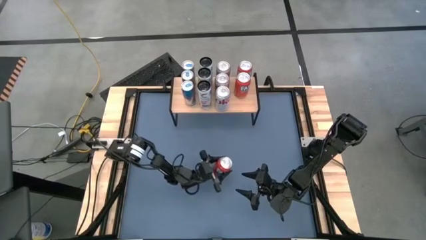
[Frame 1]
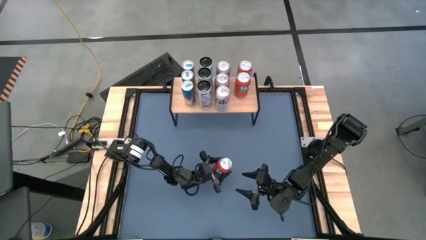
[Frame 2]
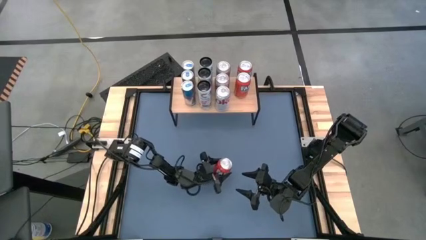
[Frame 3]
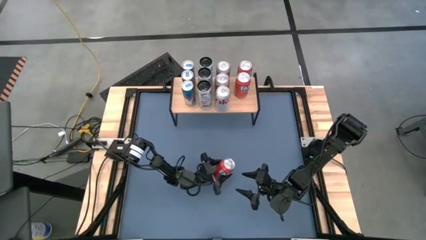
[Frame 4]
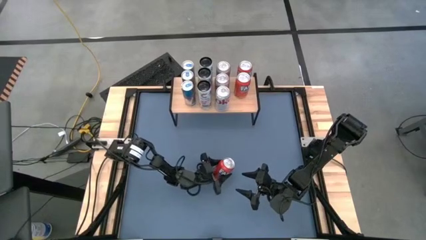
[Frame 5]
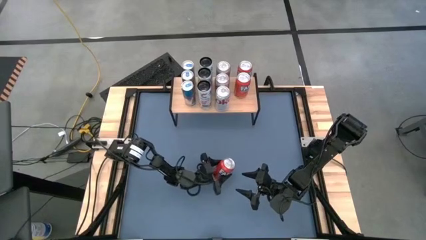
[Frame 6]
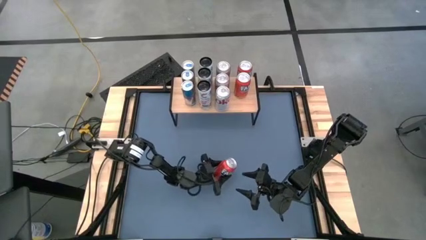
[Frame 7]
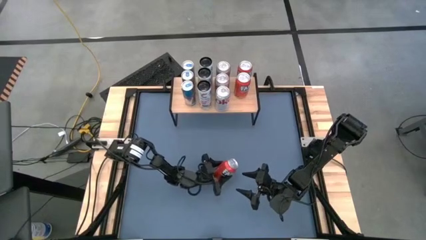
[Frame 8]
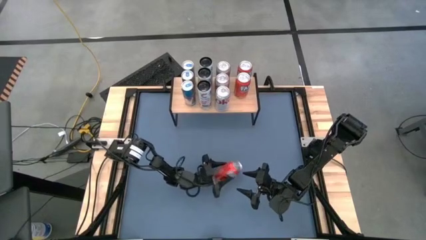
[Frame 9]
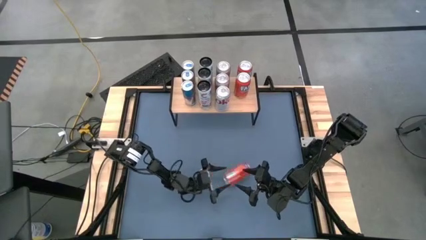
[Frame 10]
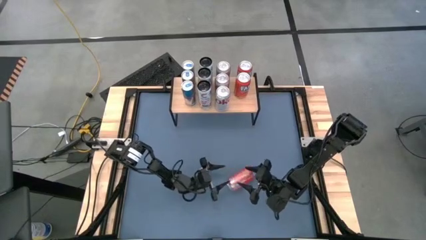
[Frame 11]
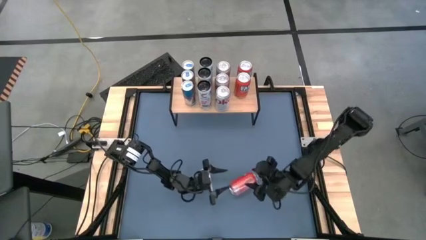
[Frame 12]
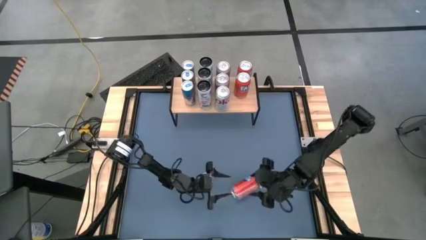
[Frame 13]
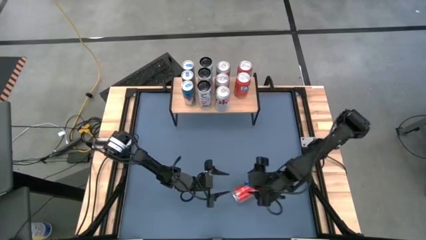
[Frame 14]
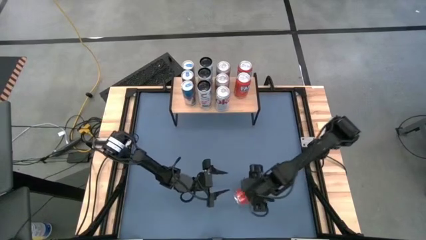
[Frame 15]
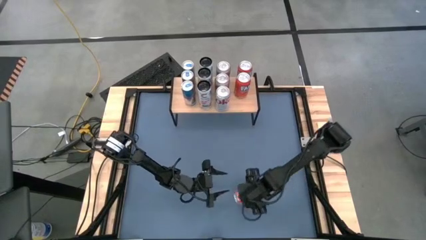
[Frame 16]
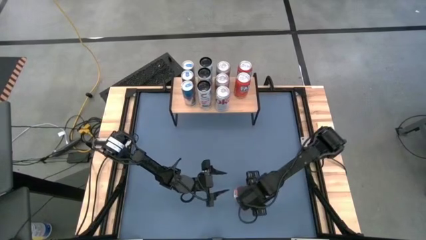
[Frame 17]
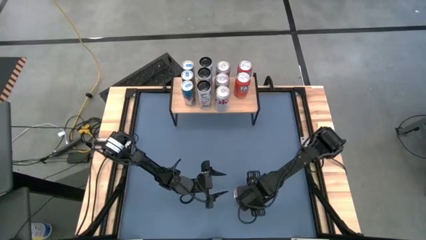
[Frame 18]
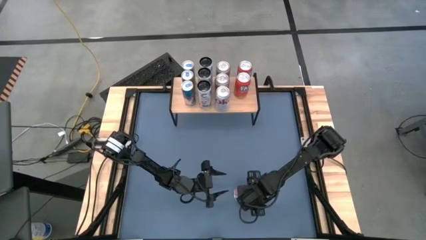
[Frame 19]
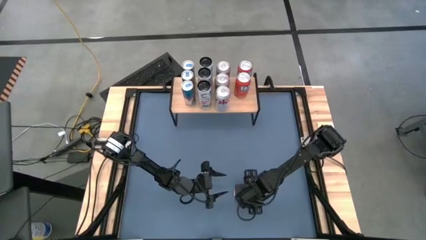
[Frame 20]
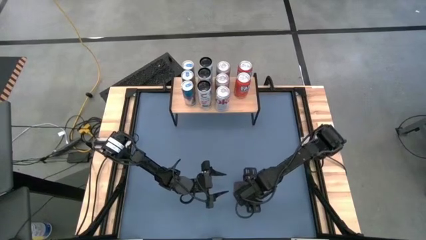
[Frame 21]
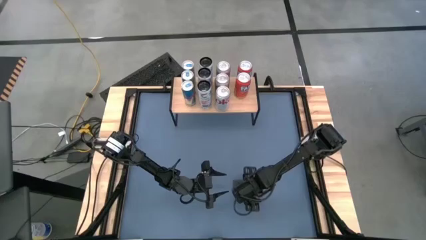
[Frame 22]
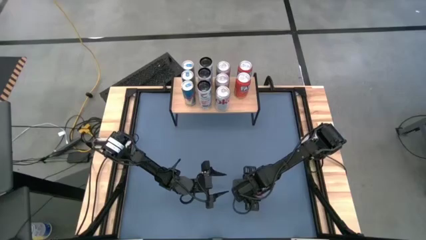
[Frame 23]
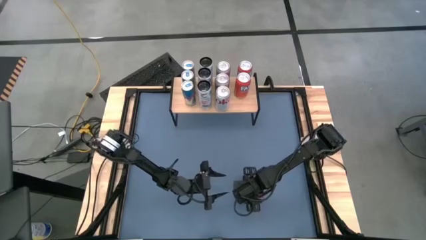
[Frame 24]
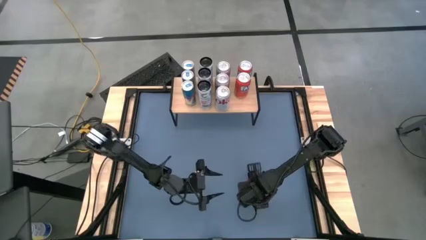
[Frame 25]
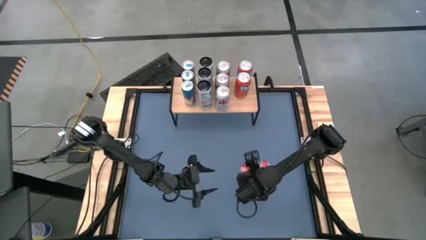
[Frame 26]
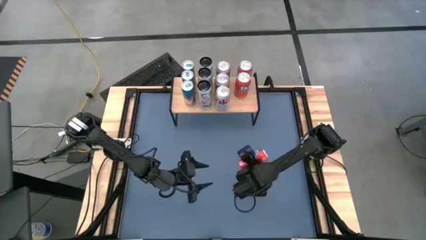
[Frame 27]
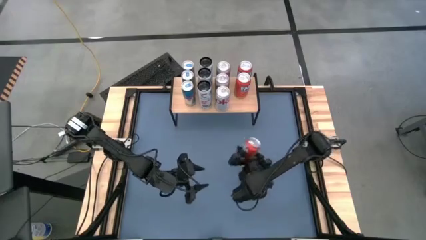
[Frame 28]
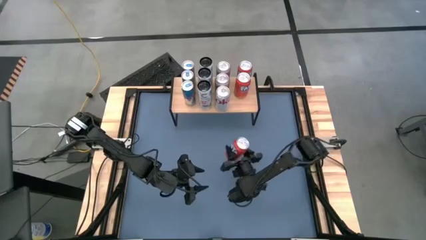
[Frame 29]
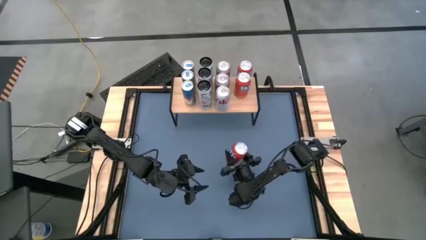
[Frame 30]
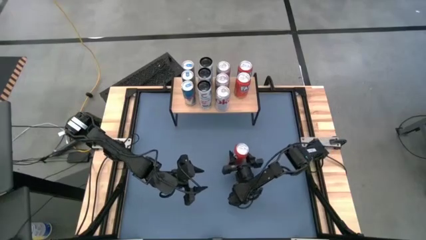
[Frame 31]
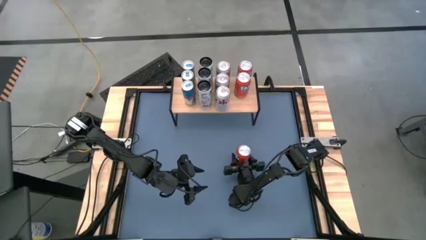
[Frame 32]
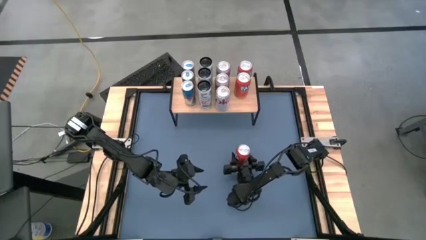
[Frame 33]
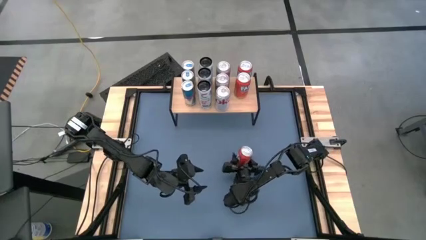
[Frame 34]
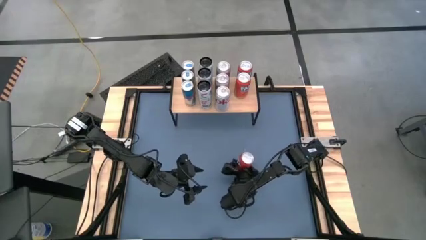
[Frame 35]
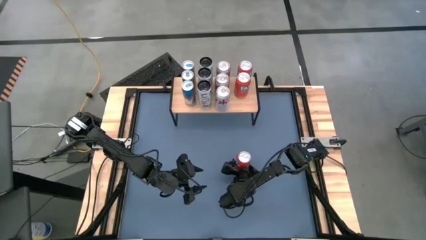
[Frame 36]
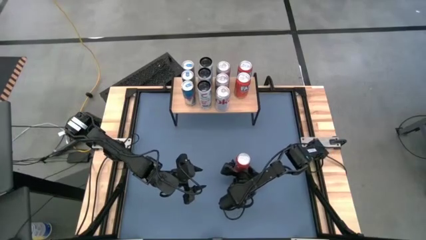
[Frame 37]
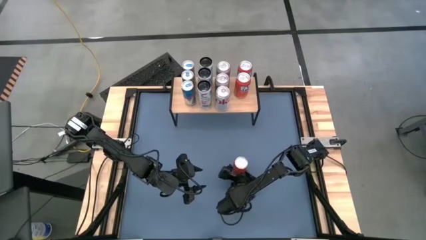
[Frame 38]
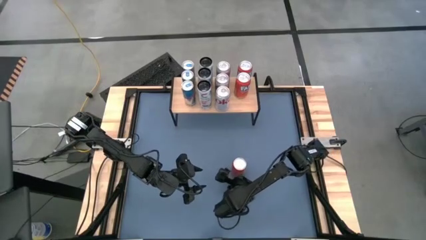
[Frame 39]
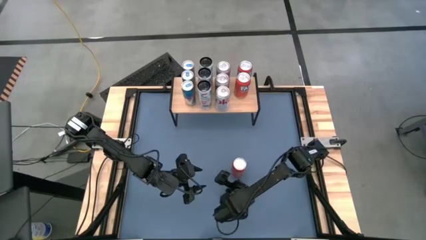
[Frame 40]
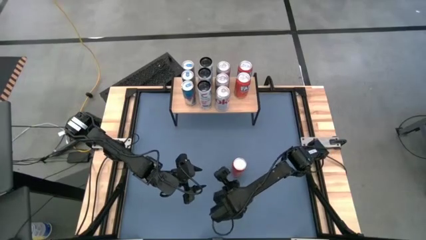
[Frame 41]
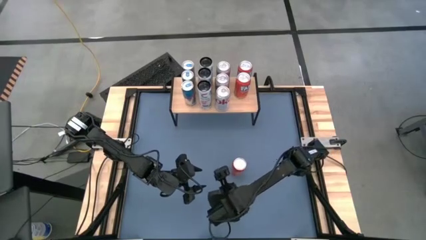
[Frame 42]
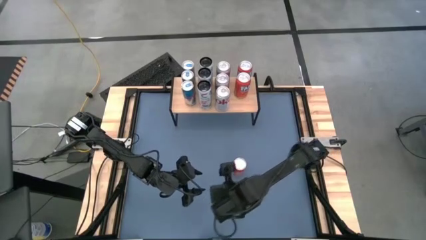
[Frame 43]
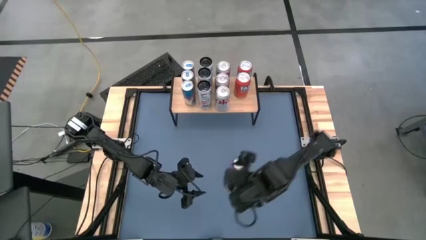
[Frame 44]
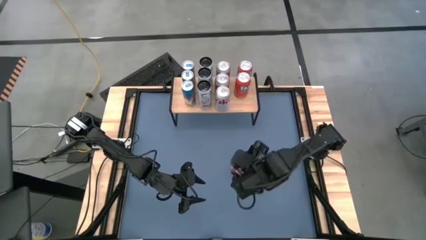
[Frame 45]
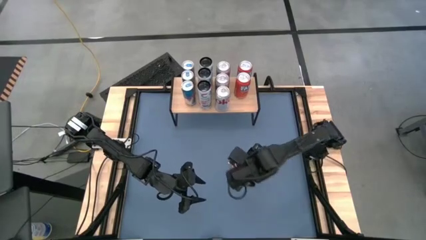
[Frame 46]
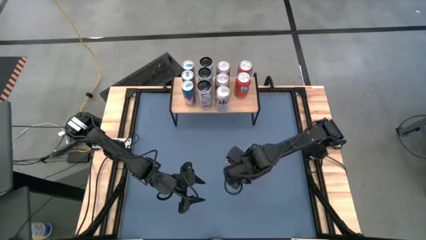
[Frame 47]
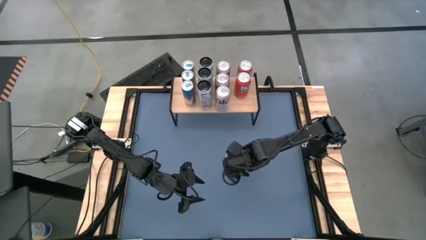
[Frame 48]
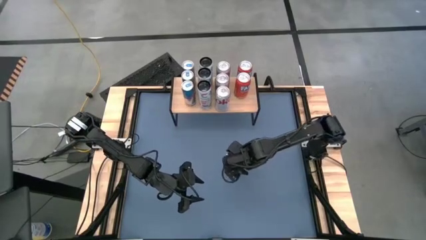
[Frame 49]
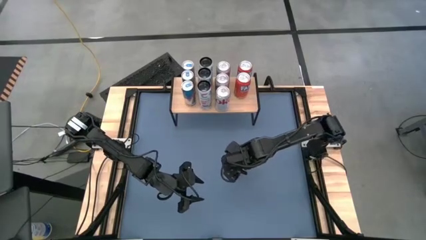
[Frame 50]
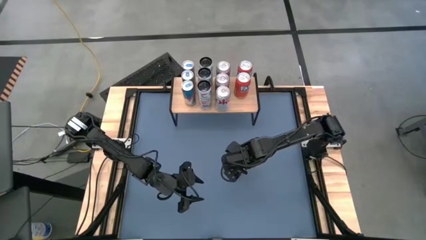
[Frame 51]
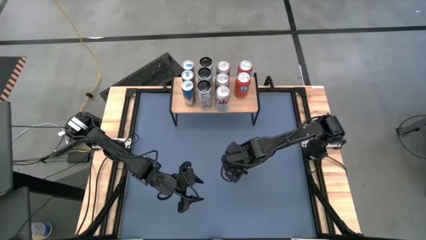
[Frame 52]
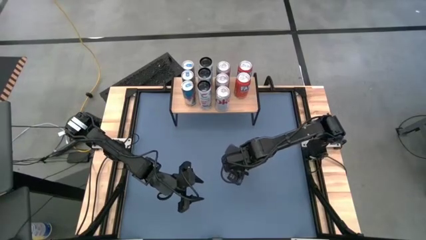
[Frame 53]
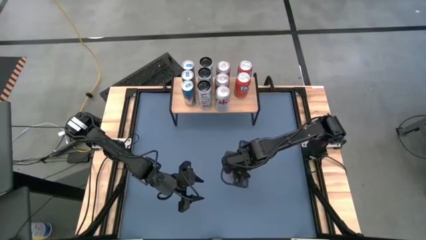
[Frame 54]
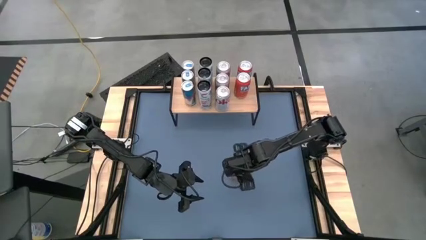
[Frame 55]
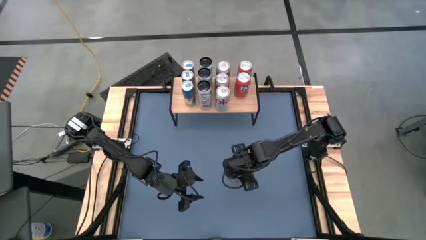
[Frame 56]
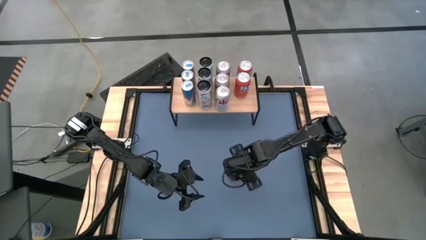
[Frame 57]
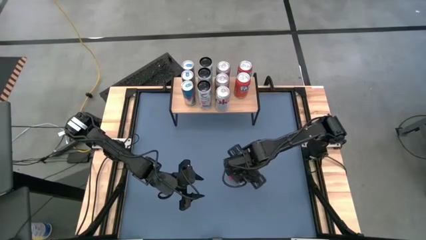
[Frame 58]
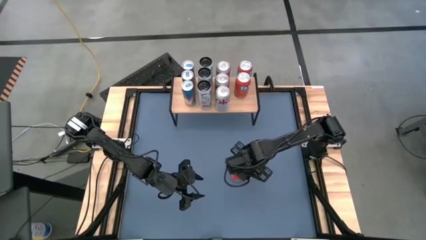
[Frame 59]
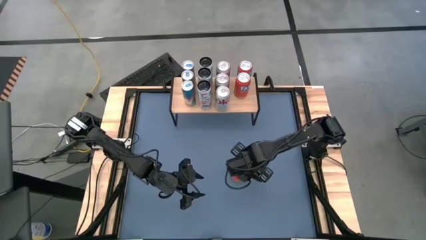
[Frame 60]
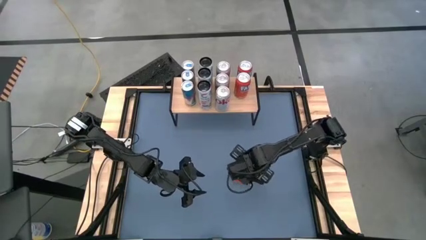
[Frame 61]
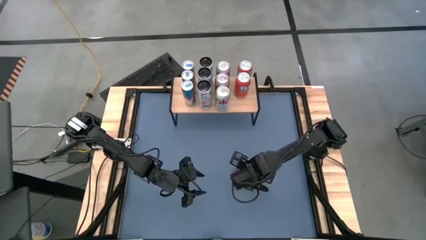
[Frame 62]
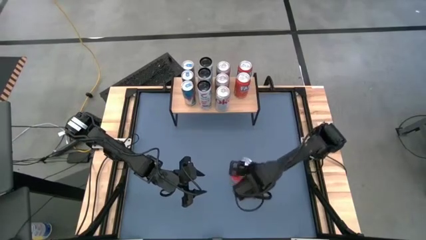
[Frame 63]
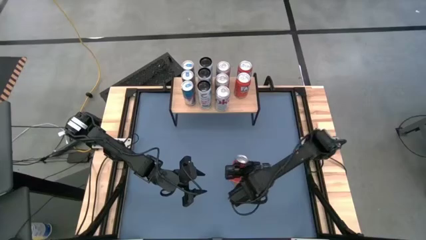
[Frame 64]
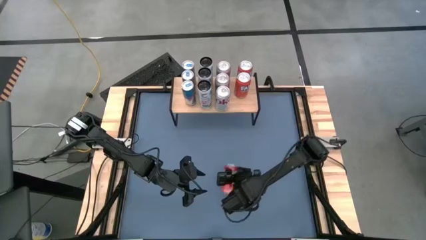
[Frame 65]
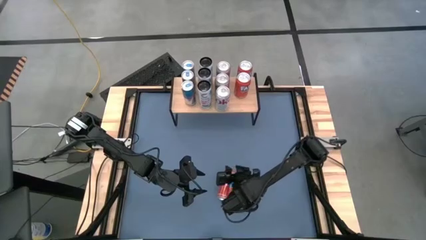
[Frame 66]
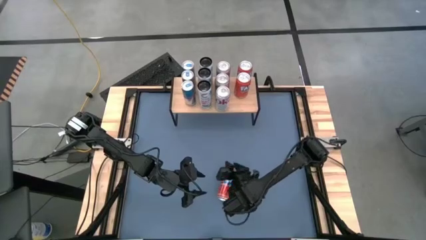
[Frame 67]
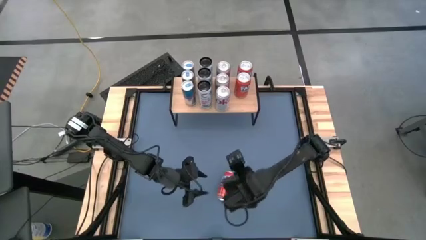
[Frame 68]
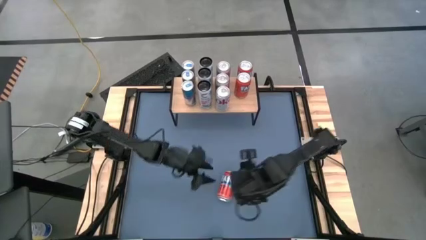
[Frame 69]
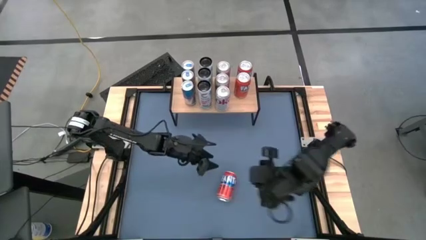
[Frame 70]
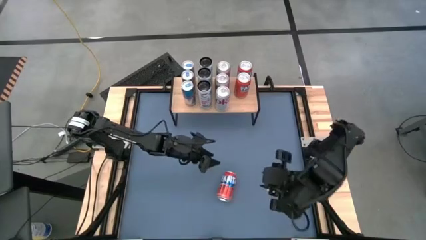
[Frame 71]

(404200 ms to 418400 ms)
Task: Place canned beverage on shelf
Put the orange soda can on the shelf aligned with the other orange soda can
